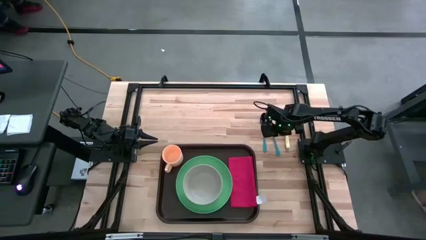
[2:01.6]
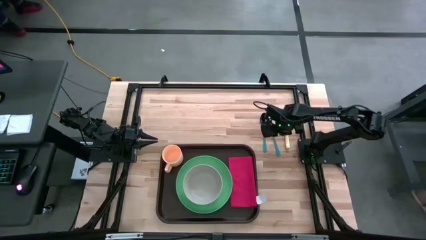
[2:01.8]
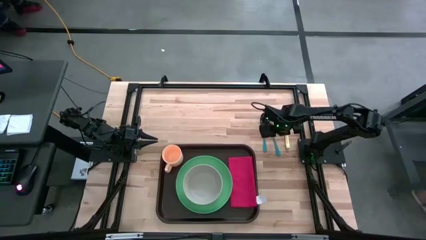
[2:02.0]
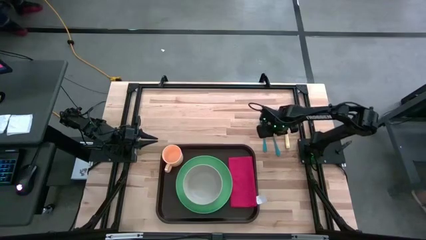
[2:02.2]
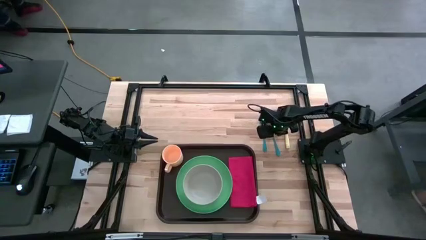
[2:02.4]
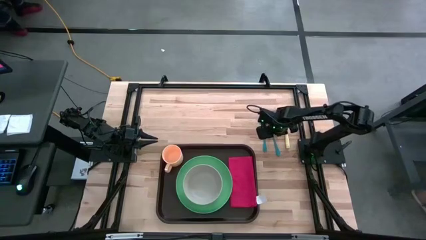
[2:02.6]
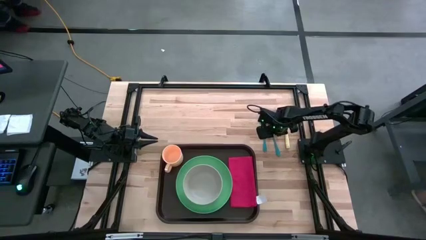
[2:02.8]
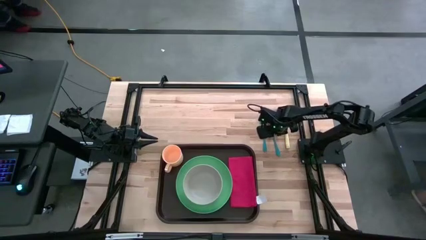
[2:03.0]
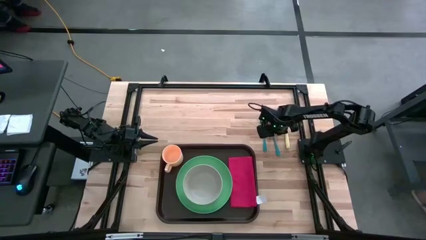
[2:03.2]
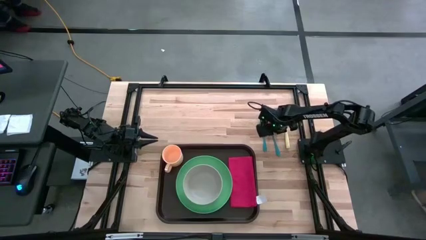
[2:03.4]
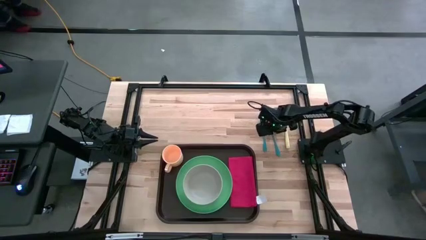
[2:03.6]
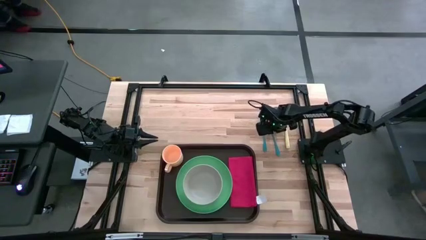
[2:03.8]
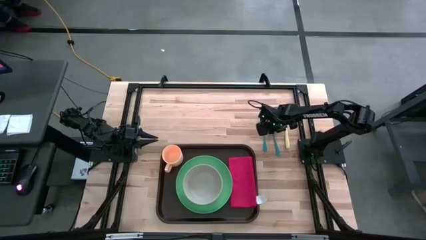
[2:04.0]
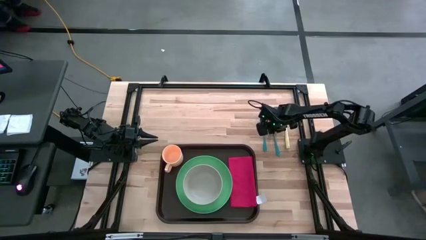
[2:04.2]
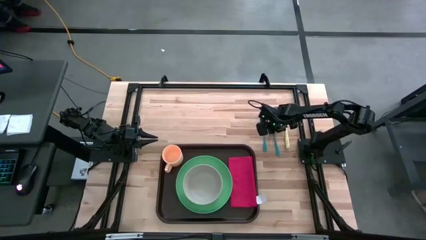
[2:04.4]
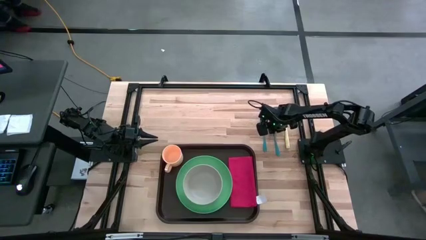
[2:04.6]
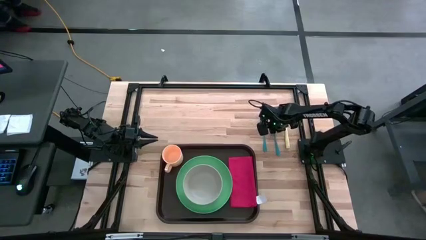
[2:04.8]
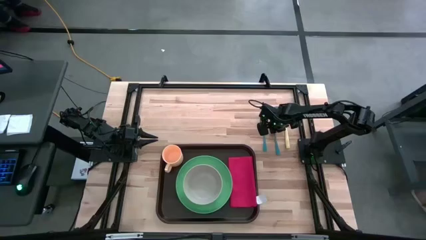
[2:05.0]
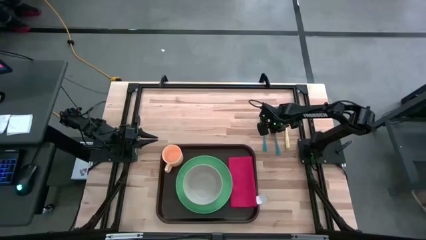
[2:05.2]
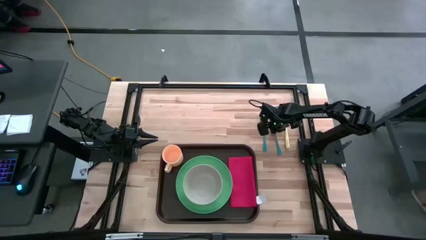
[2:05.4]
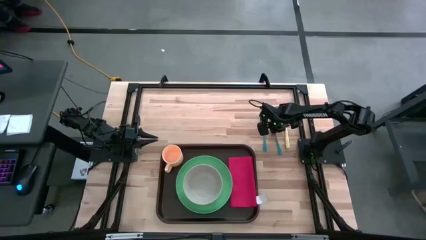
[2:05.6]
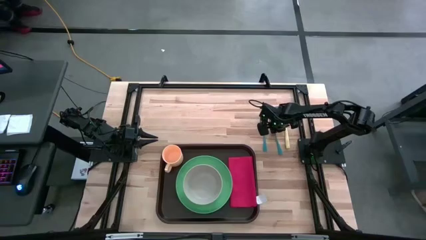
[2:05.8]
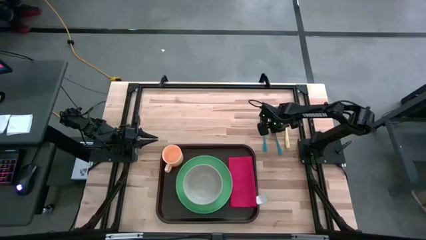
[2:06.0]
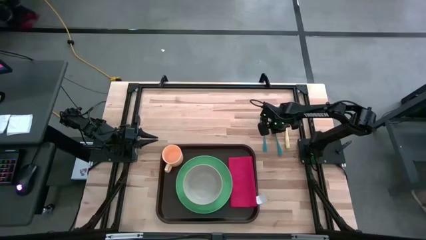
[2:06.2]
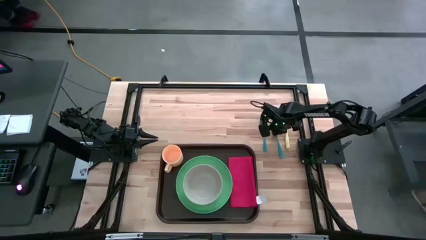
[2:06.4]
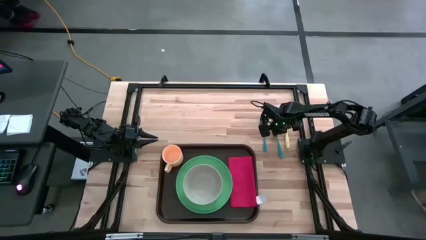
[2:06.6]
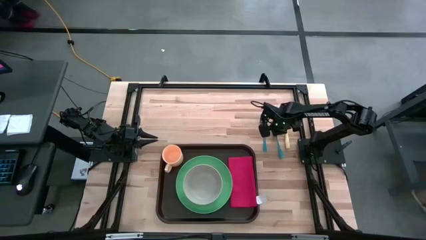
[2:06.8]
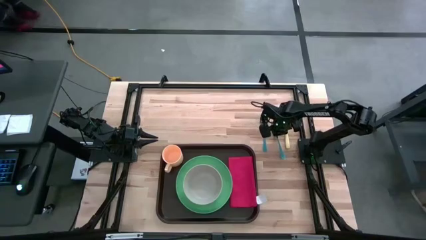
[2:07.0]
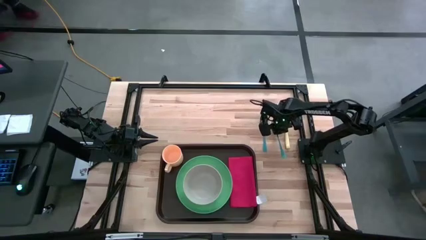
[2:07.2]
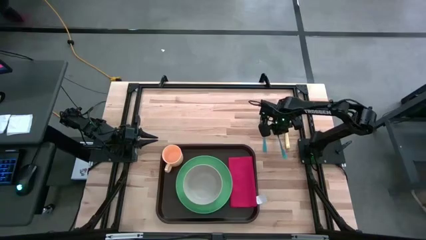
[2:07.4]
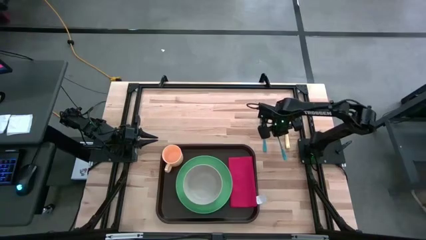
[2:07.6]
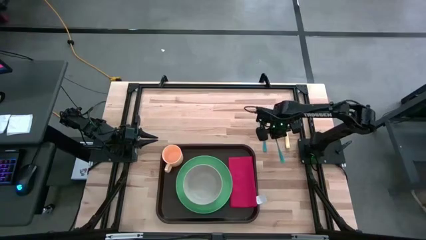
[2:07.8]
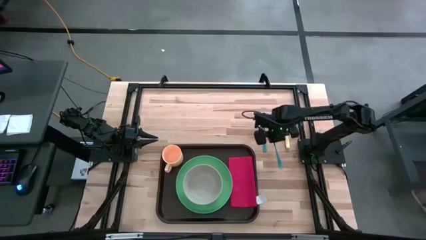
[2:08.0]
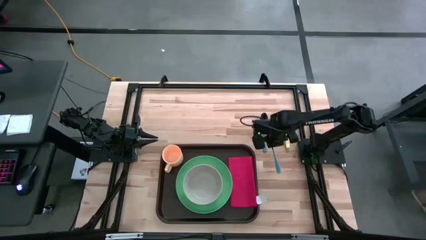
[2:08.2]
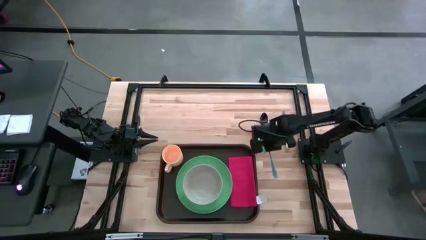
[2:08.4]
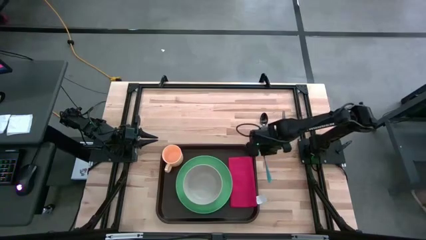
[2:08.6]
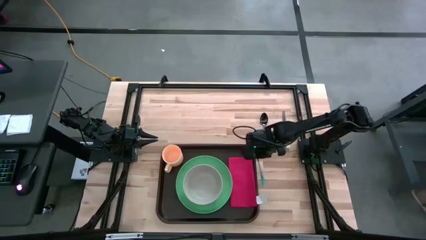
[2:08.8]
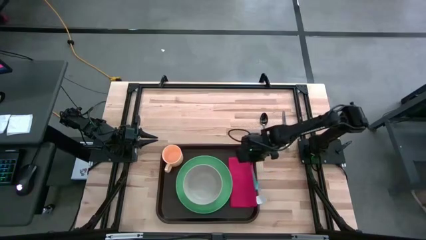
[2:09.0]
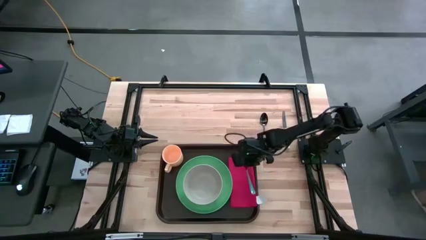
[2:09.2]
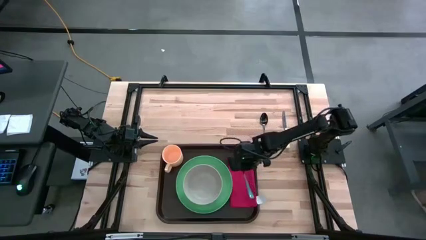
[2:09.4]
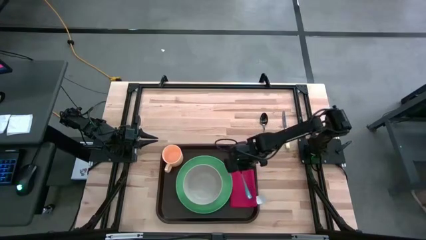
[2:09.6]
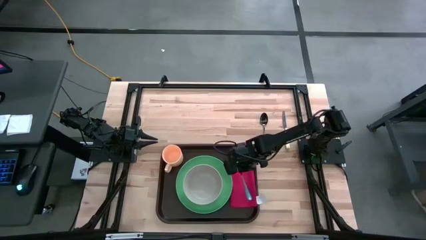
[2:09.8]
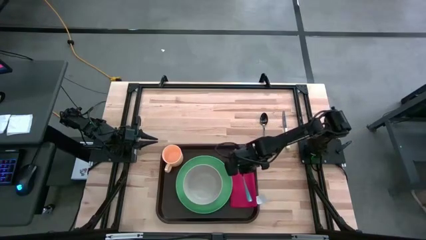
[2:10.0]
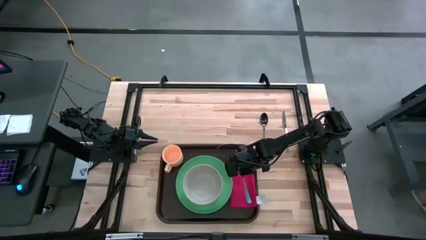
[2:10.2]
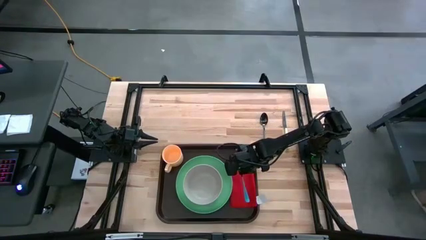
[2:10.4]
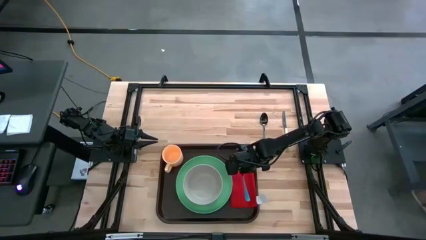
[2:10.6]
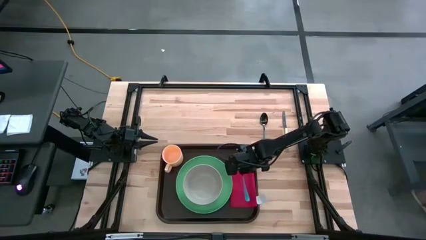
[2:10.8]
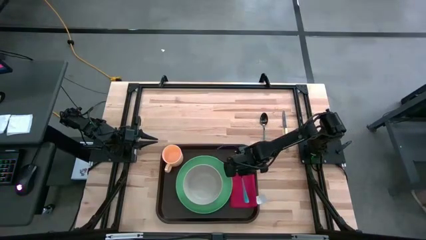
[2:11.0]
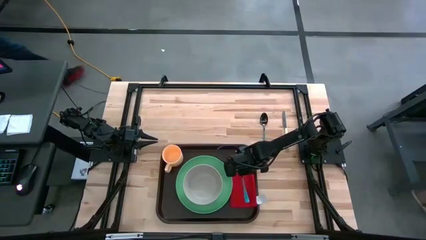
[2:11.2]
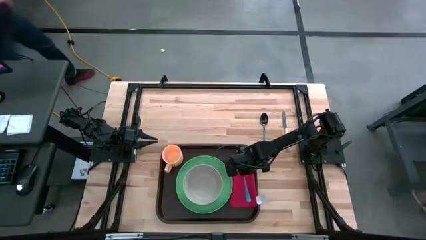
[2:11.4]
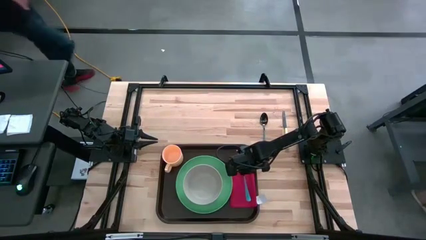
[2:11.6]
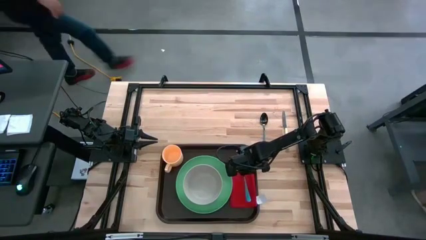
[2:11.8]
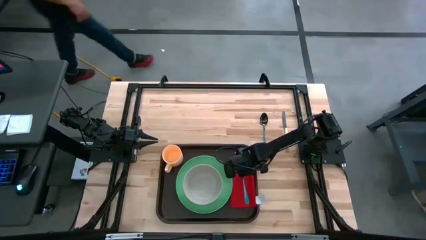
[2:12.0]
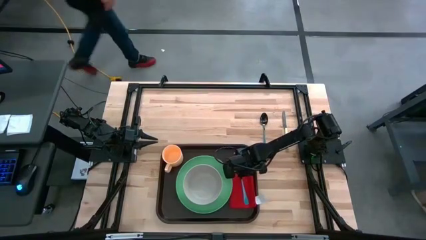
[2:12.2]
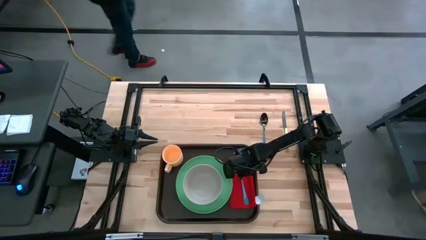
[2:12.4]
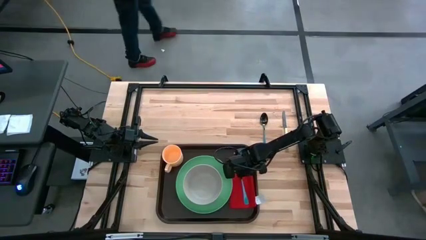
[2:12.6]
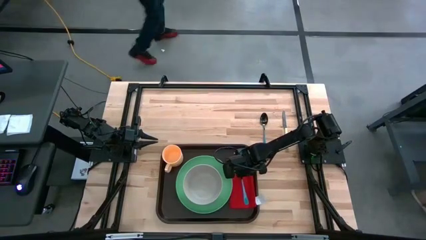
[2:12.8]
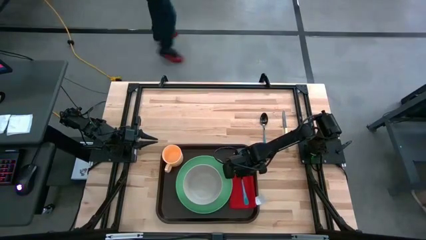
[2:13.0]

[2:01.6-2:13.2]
Task: Set up tray
Put the fork on the table napkin to the right of the green plate on the serving tray
